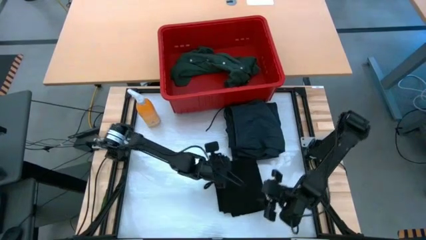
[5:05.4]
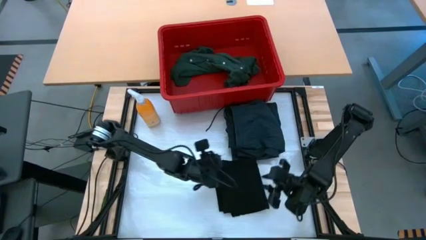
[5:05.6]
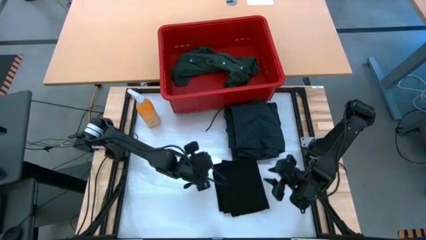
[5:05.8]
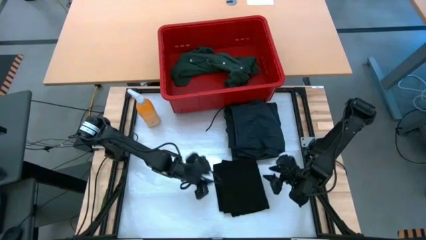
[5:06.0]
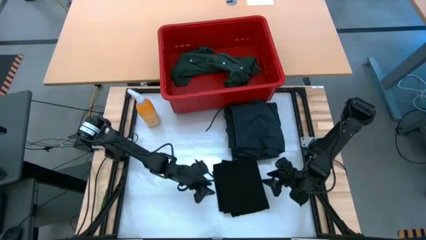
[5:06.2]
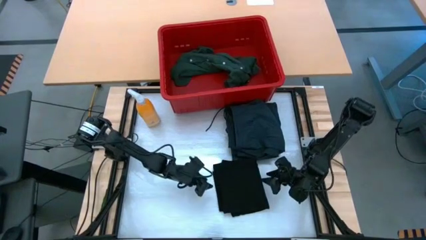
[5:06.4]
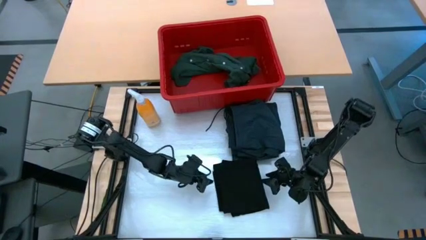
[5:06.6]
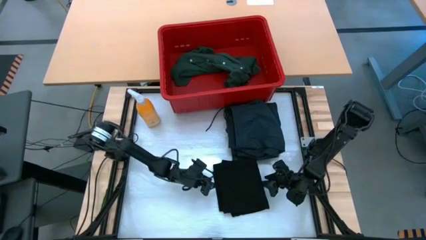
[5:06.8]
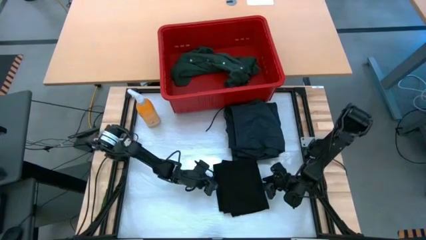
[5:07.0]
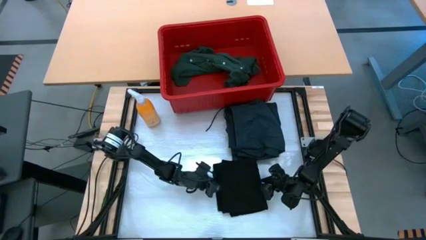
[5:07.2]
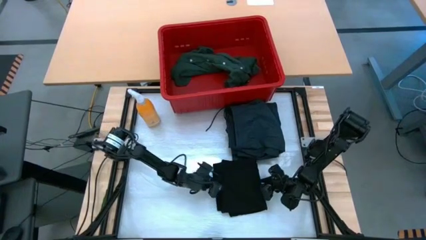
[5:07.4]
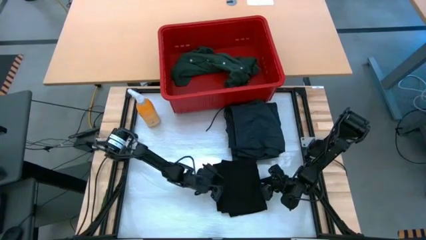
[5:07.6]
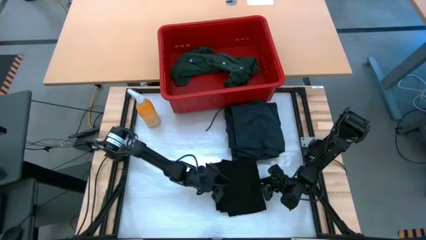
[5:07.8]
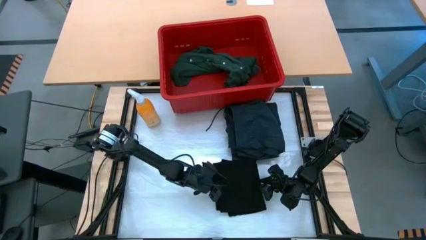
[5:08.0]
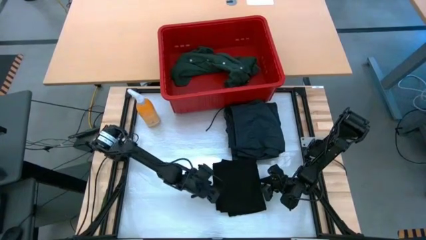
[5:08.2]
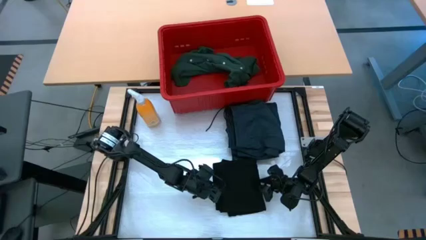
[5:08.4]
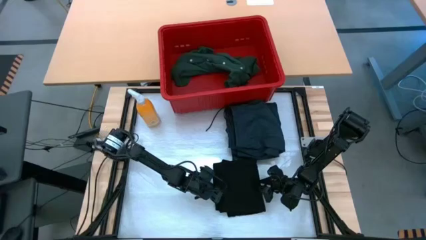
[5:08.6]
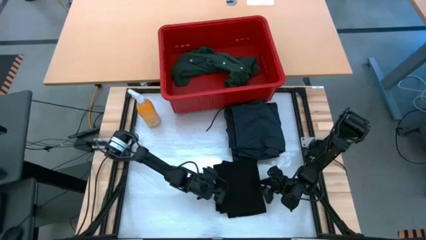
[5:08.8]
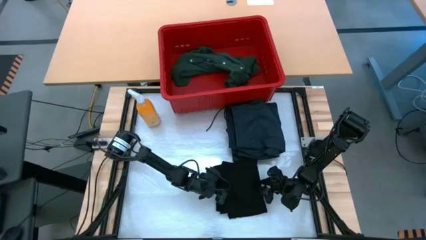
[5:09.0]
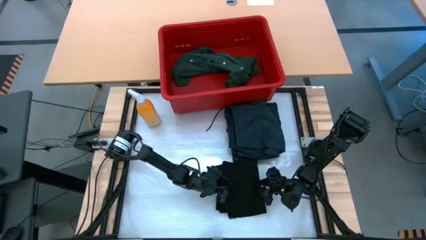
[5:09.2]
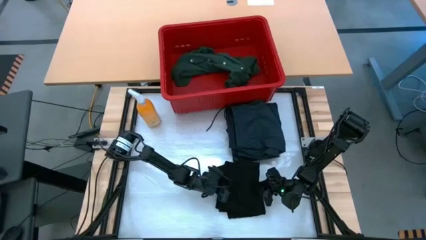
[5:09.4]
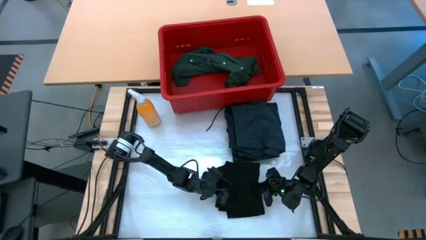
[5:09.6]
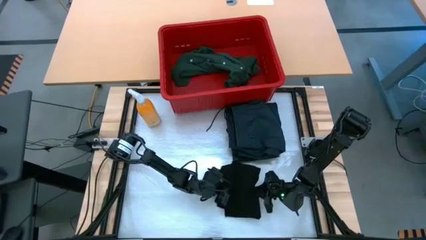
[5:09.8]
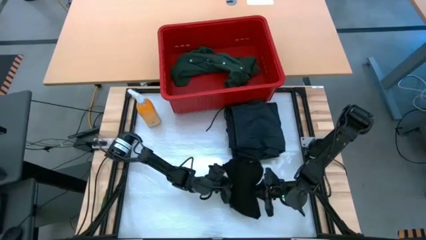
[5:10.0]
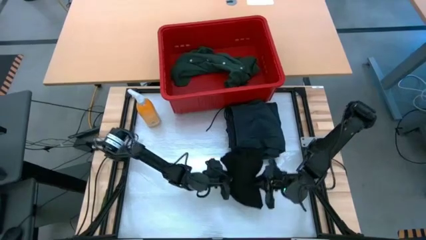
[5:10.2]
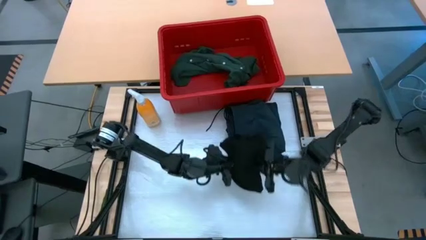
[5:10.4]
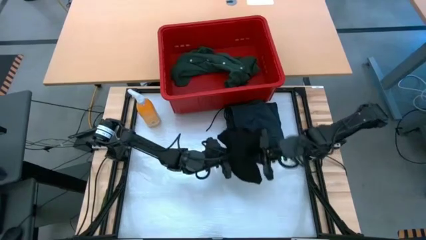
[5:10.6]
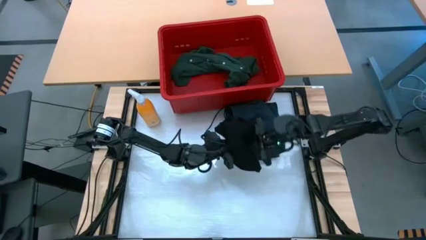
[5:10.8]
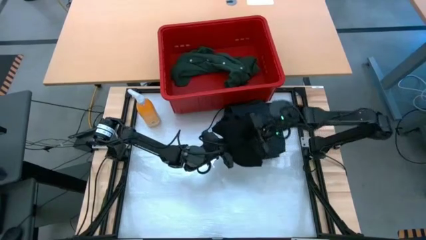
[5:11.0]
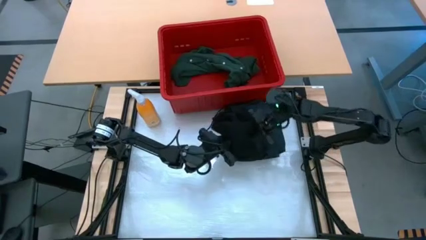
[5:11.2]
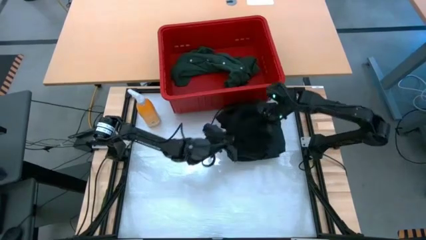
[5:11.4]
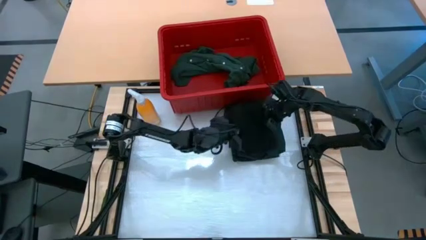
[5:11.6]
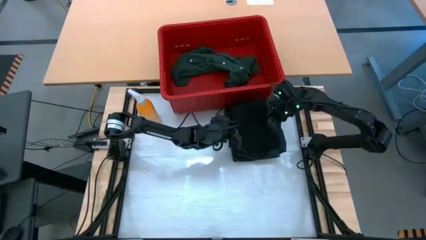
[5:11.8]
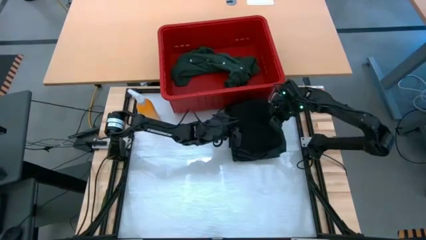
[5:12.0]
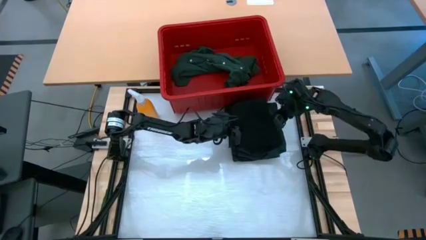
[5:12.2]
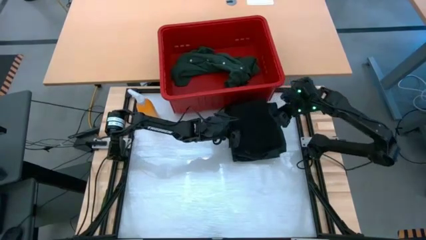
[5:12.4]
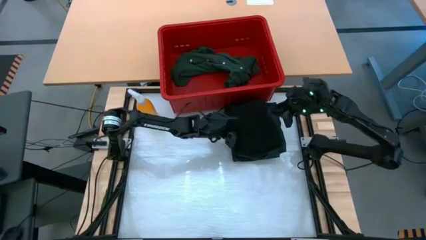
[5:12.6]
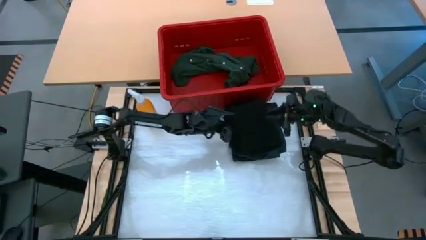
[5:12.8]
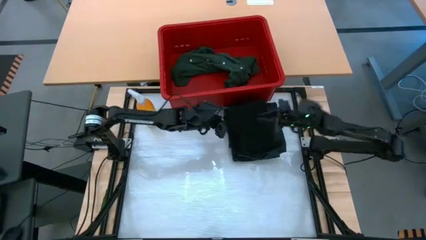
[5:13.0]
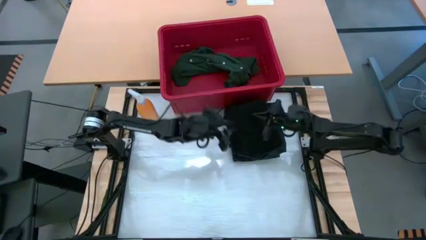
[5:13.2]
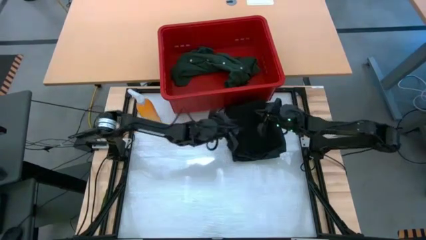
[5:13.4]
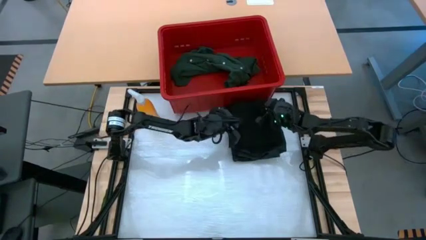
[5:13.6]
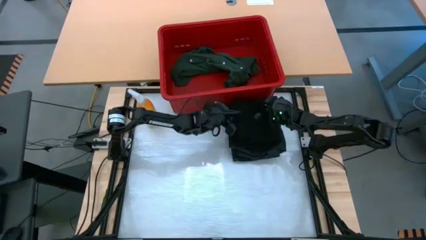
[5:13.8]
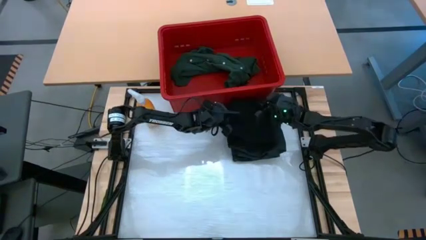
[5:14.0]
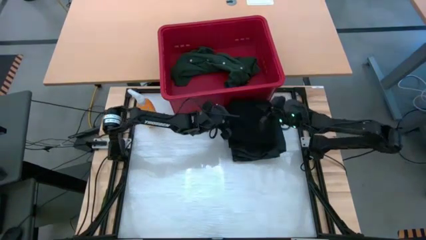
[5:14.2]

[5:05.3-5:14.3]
Task: Fold Laundry from Bin
Stack the black shirt on top of the dark blue shorts

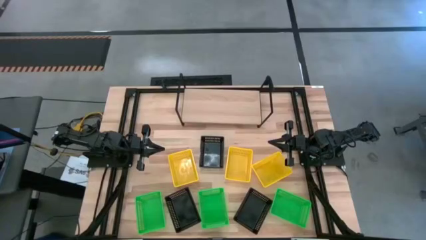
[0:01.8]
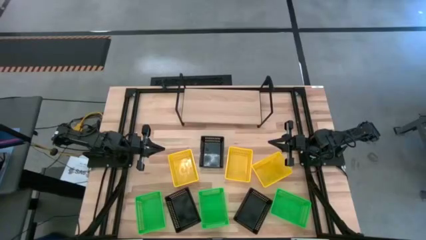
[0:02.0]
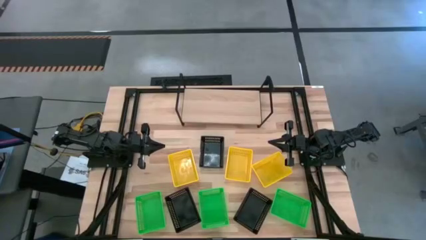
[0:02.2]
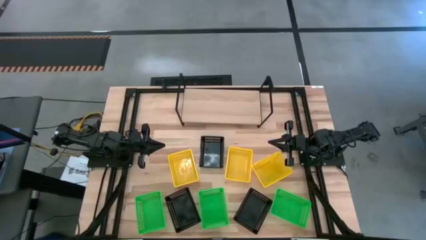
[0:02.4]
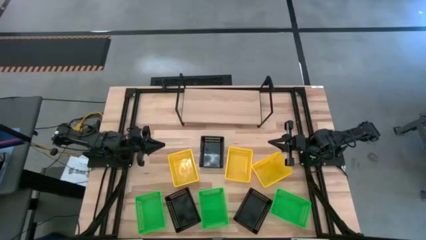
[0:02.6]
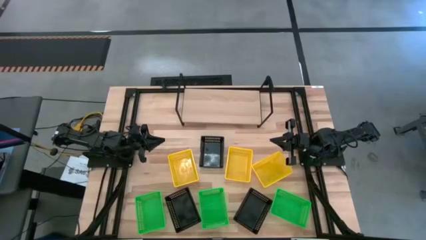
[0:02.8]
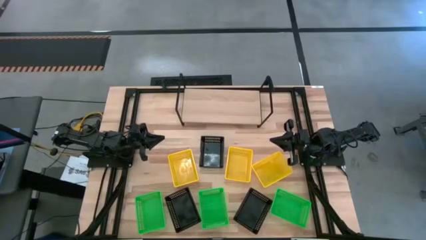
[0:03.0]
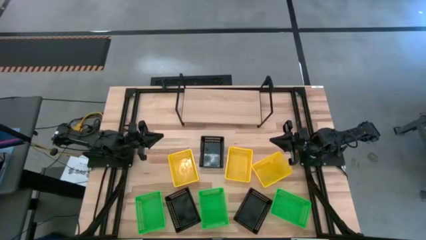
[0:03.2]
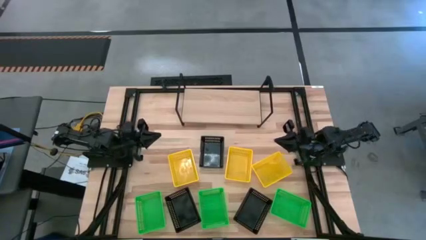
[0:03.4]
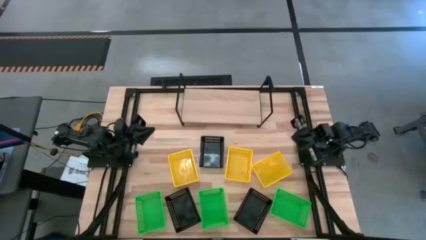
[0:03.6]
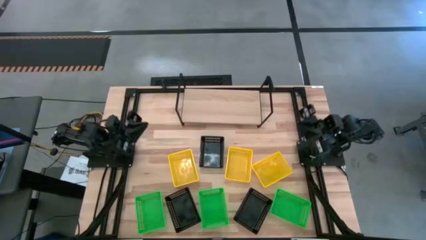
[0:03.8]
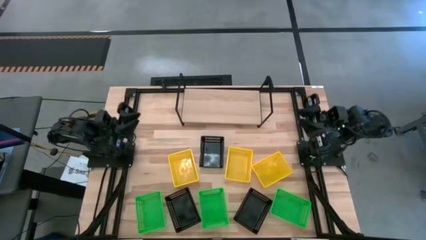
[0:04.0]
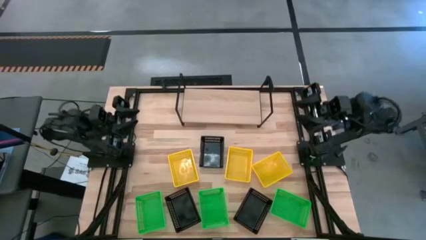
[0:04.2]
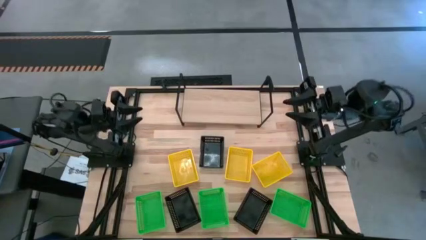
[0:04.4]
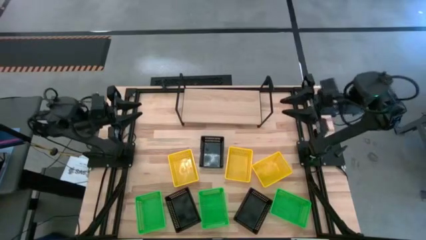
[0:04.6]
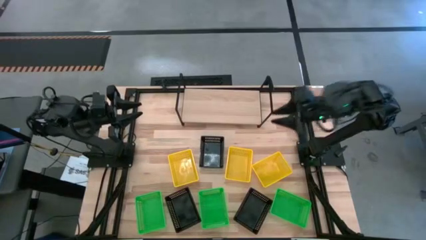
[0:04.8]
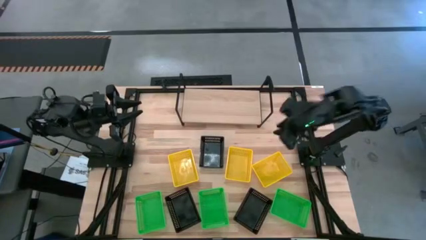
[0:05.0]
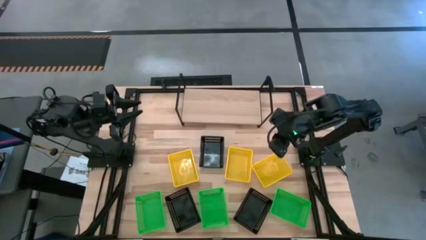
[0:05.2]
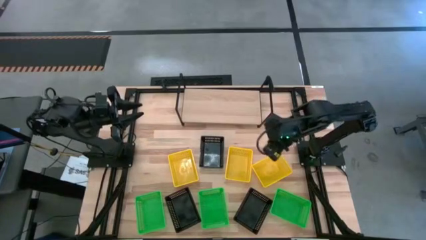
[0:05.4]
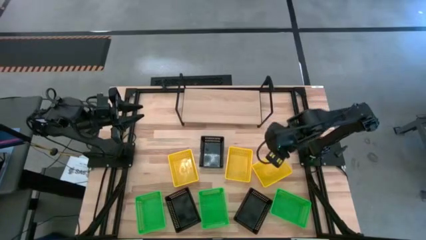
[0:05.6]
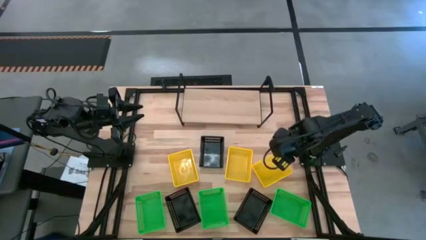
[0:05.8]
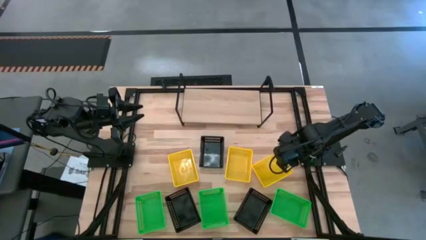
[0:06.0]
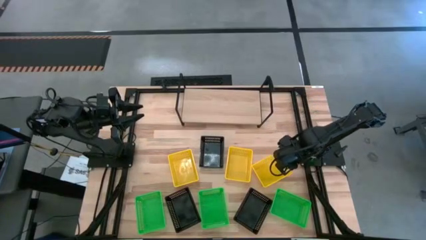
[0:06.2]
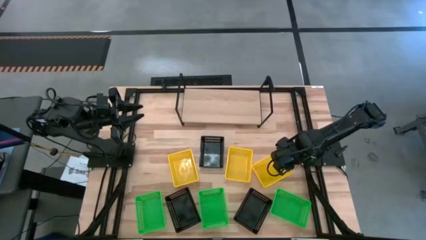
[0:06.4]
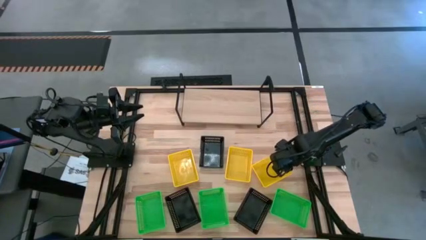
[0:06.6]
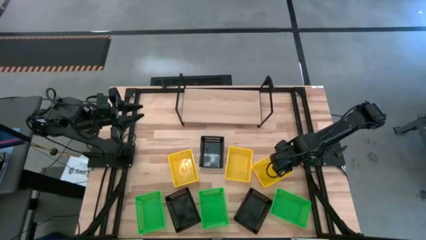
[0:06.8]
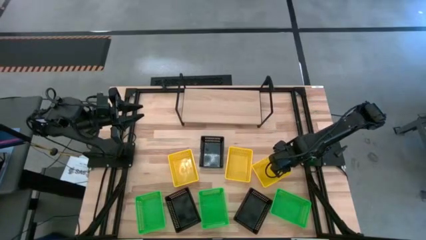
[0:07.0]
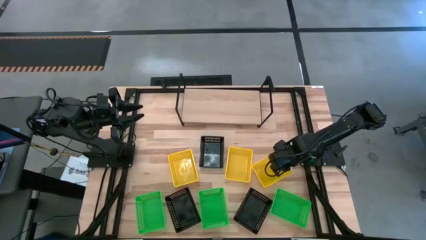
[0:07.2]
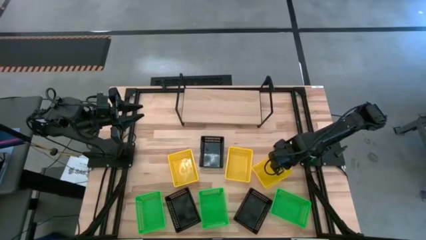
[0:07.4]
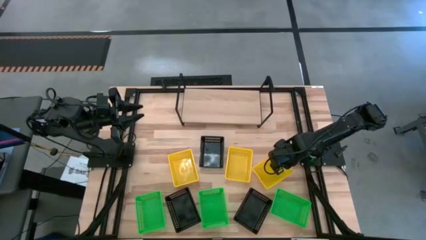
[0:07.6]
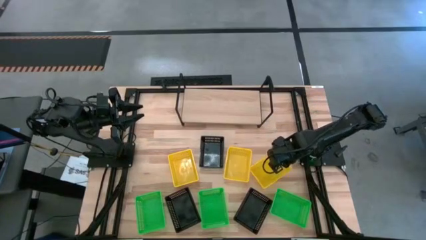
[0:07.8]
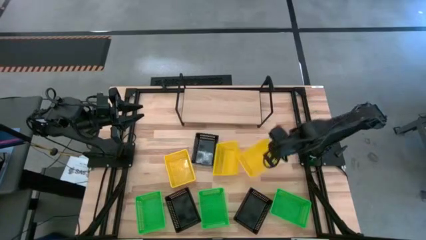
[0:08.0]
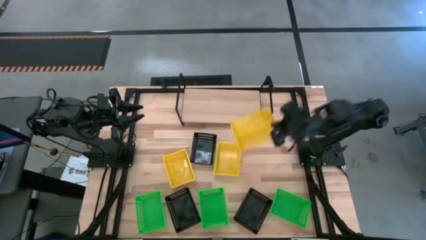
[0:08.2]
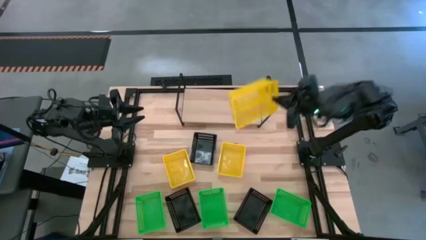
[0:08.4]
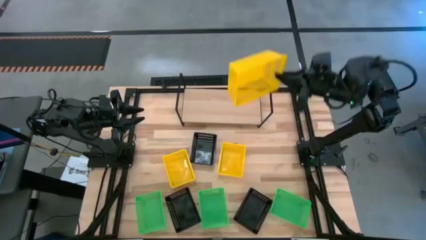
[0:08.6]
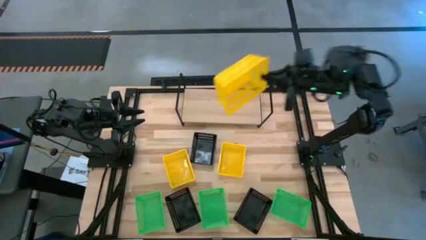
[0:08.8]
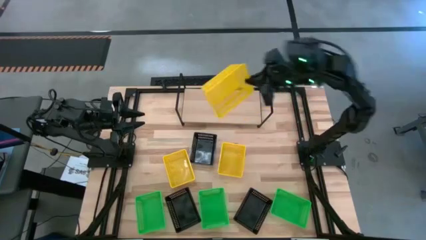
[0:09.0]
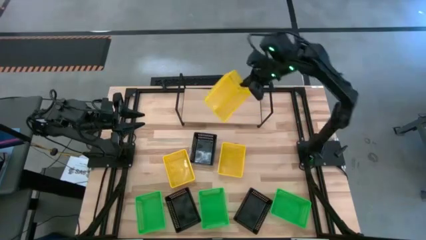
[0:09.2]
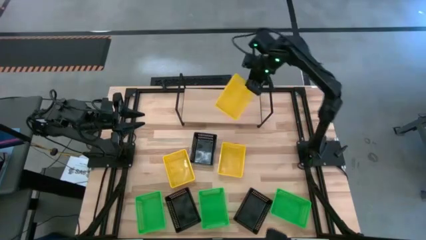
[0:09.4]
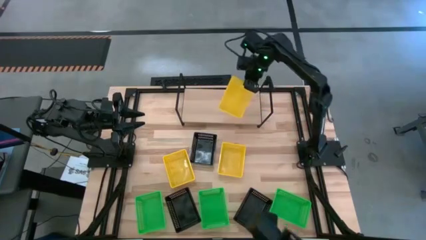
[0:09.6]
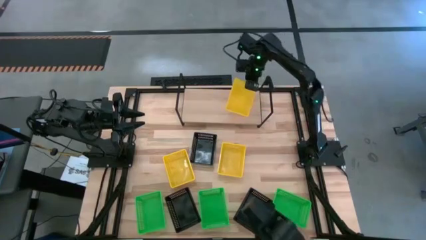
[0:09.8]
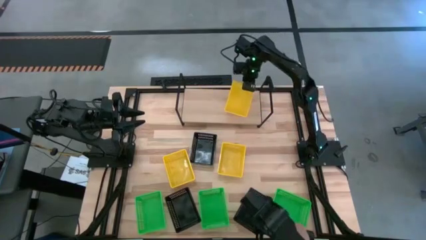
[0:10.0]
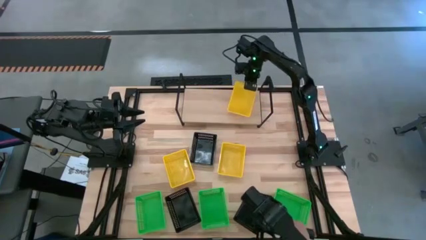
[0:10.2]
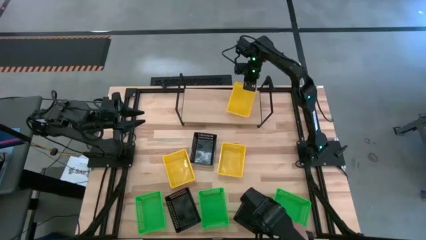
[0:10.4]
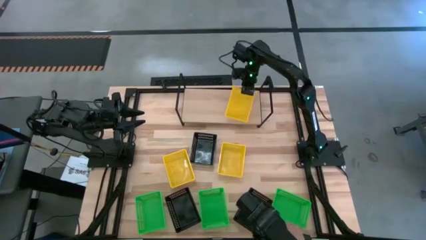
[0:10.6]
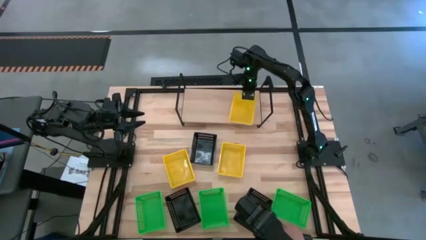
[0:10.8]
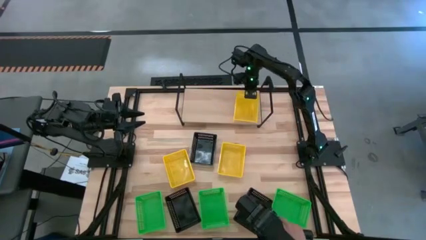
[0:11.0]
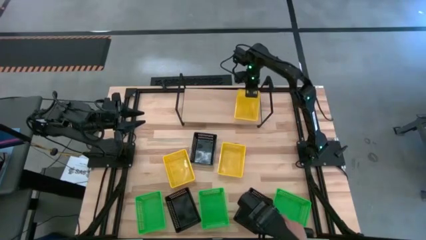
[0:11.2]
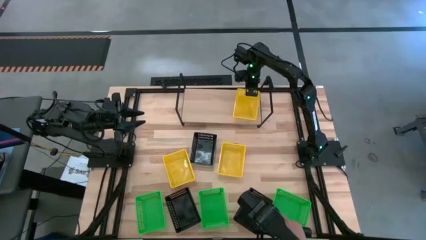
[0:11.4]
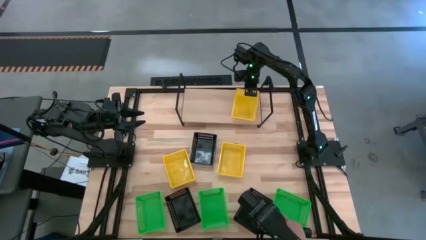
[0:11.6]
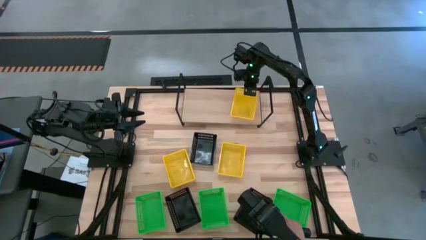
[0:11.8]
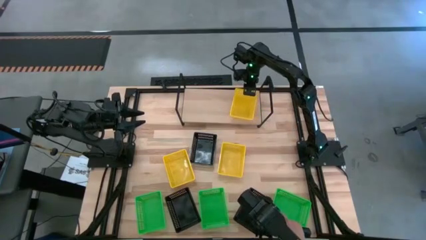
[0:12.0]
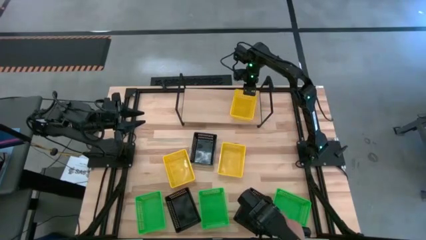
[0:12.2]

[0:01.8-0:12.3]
Task: Stack baskets on shelf by color
Put the bottom right yellow bin on the shelf
